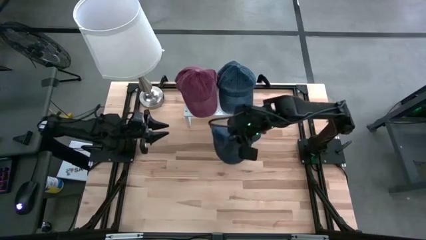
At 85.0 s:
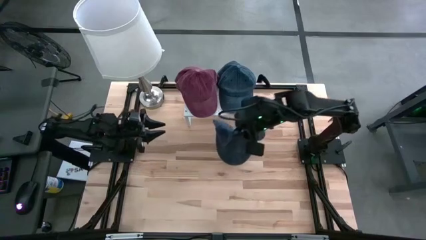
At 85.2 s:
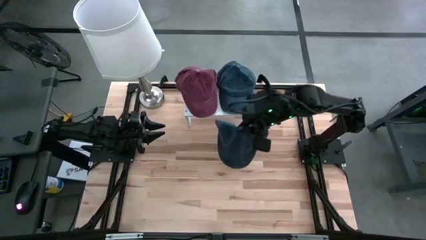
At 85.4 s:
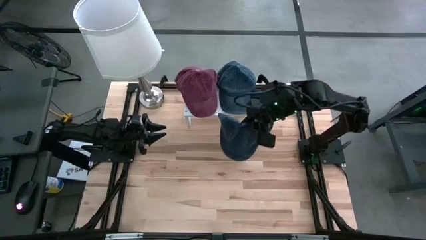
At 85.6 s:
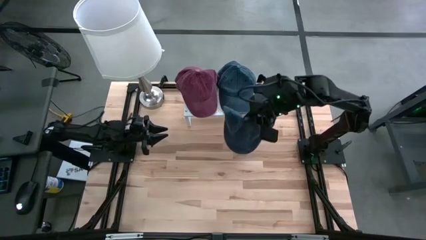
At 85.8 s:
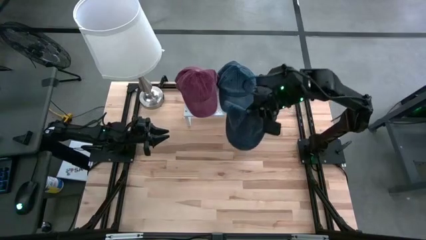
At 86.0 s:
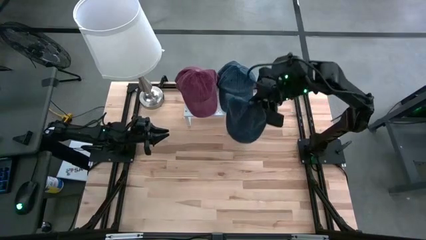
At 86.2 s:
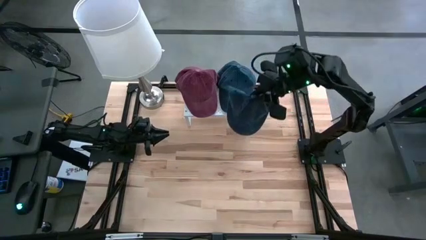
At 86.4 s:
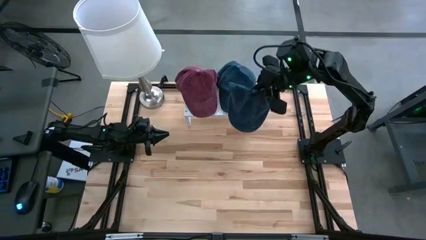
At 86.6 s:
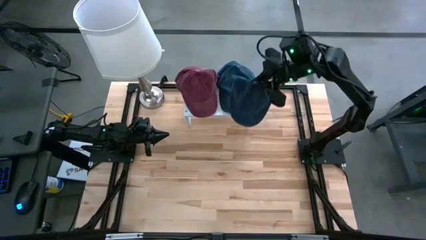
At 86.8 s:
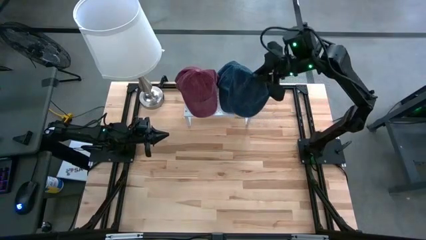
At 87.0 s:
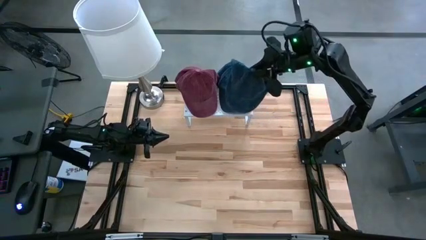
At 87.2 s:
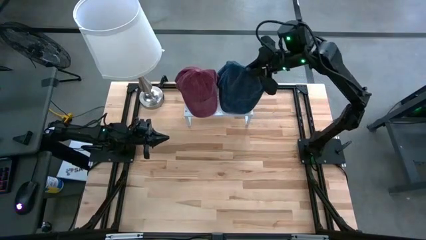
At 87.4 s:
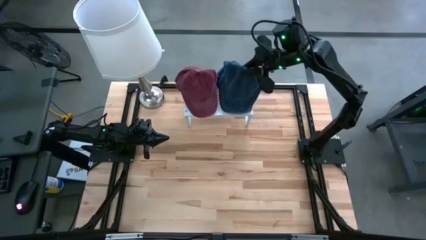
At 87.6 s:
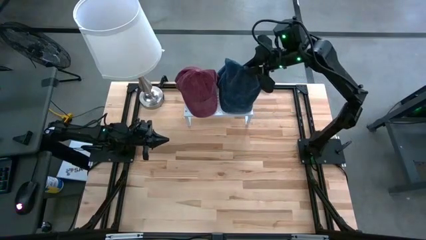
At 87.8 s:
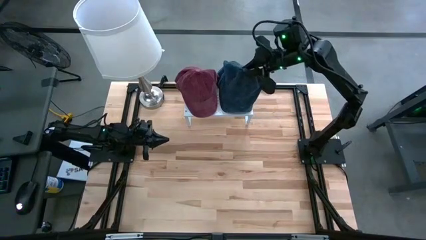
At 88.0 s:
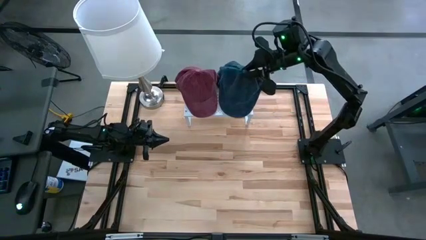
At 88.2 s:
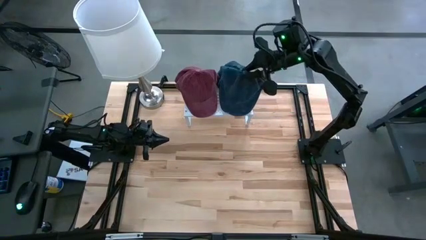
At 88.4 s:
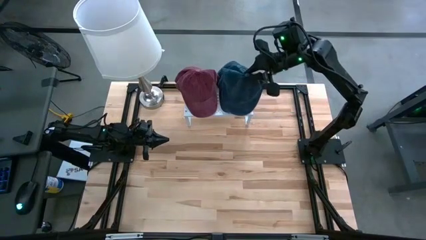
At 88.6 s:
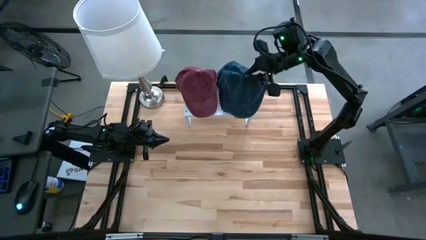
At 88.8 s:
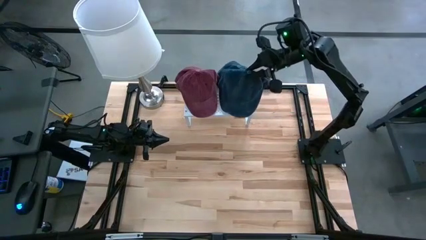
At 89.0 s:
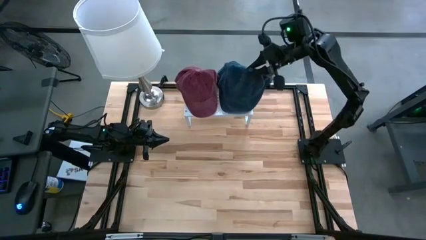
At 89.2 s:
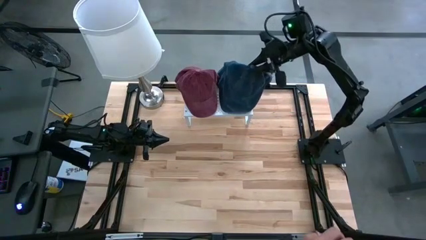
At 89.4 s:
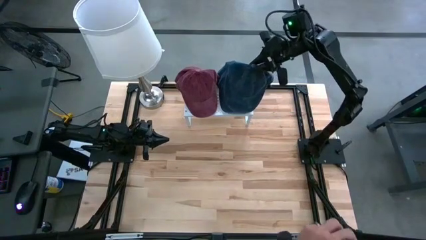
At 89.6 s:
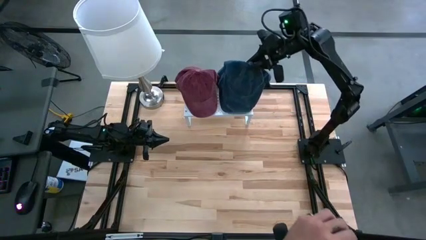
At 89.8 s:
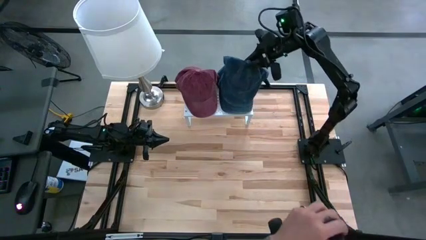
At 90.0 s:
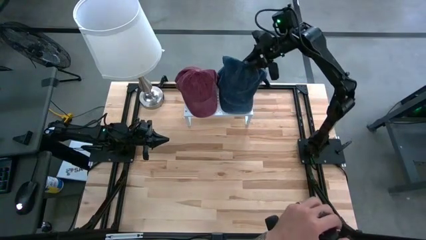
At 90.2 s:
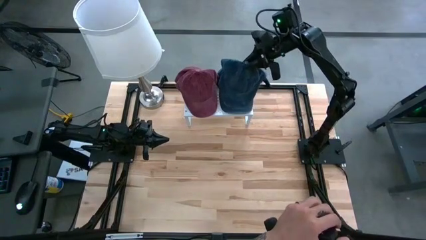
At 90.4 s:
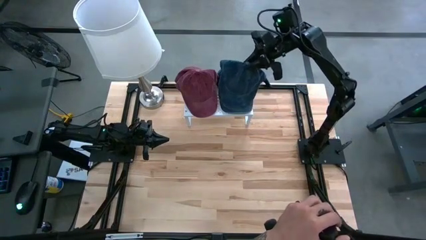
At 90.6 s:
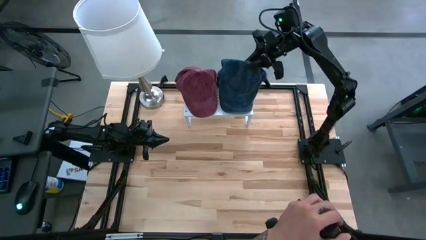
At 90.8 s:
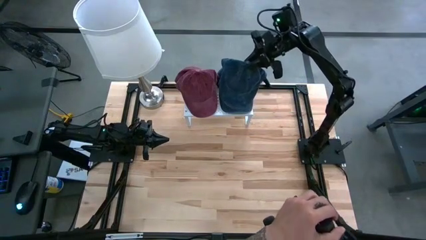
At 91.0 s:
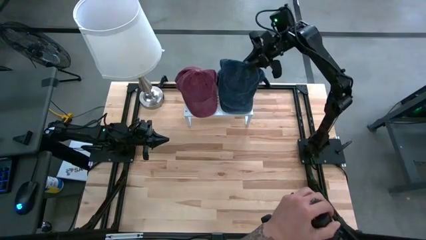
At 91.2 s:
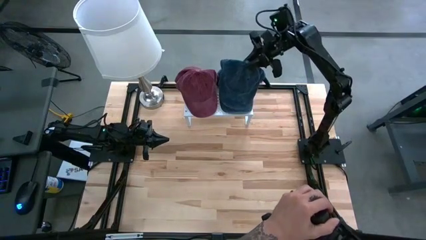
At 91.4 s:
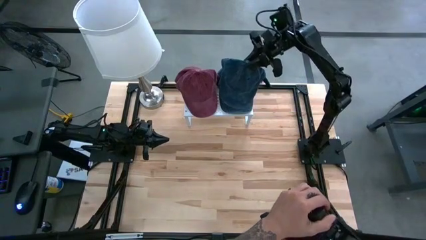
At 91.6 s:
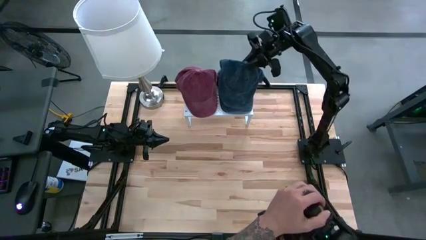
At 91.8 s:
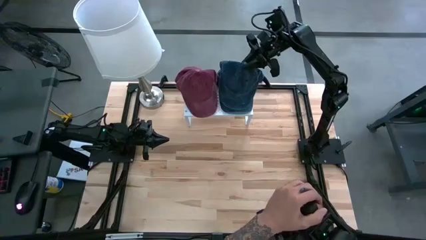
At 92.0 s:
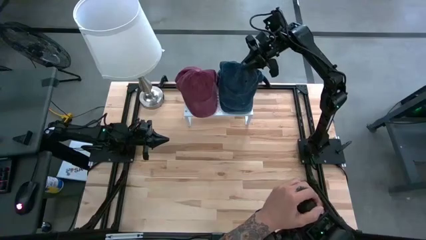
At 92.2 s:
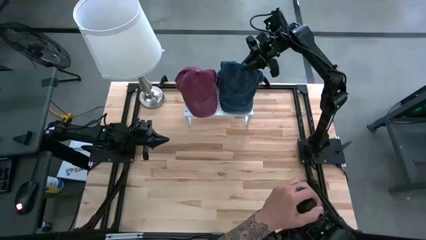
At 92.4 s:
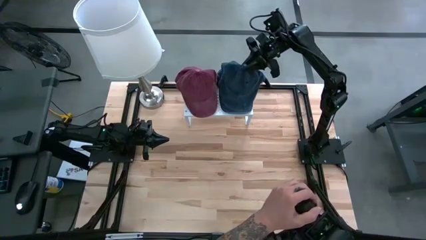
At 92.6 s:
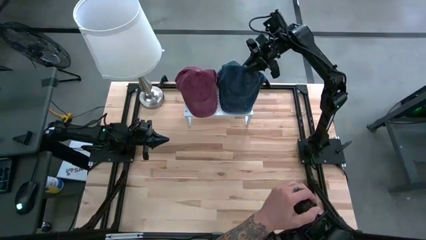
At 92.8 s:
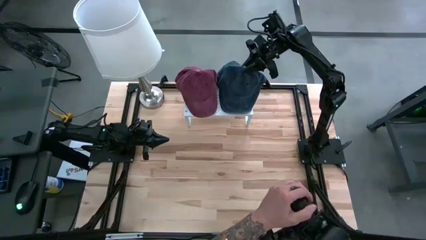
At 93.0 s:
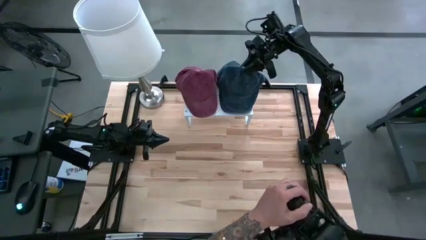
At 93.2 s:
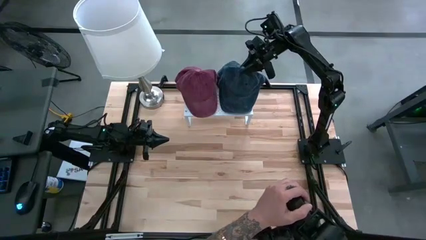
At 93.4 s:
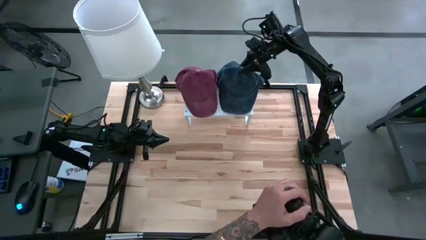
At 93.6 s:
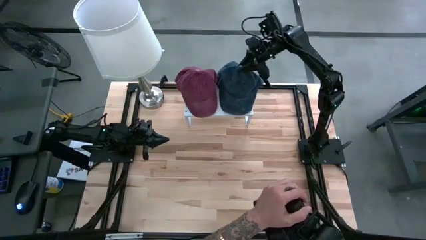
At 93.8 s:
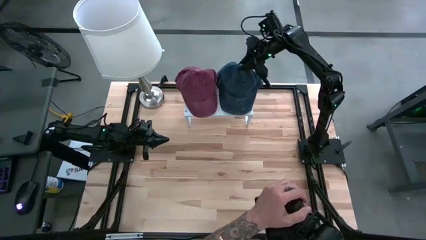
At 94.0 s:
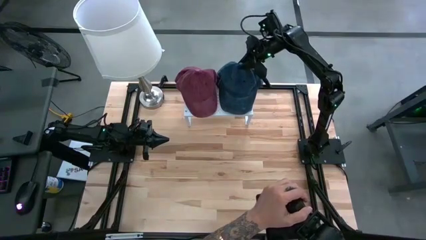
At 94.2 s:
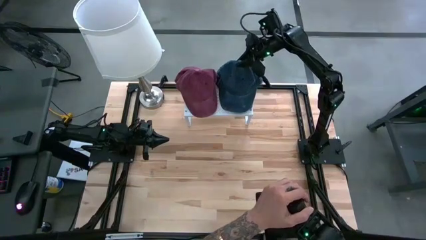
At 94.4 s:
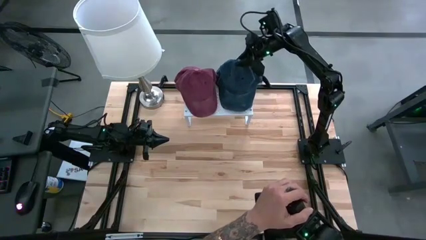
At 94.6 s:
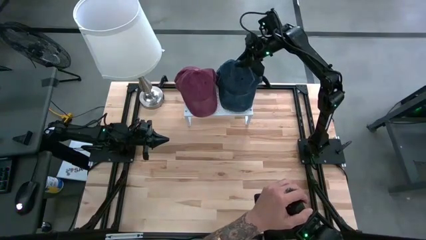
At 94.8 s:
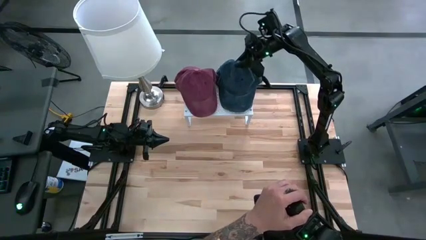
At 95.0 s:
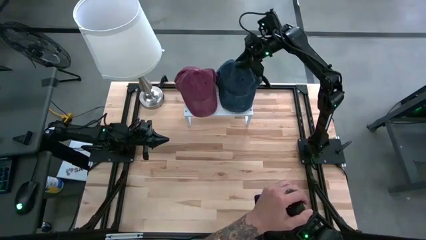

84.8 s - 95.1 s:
Task: Pick & Place hat
Stack the blue cap on top of the blue cap on the shelf

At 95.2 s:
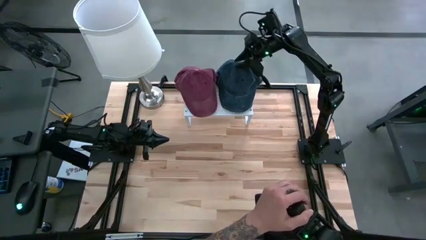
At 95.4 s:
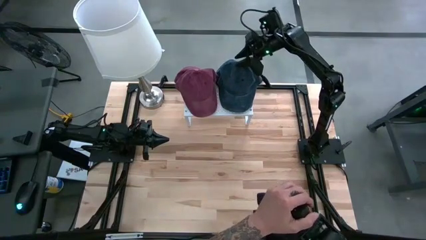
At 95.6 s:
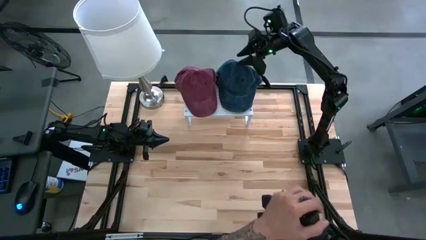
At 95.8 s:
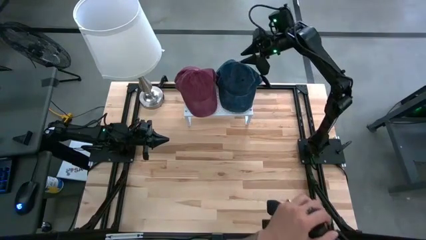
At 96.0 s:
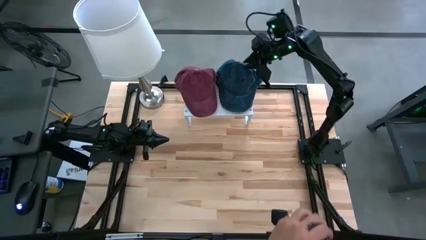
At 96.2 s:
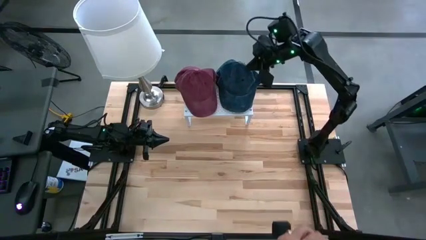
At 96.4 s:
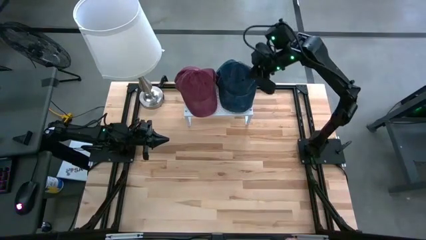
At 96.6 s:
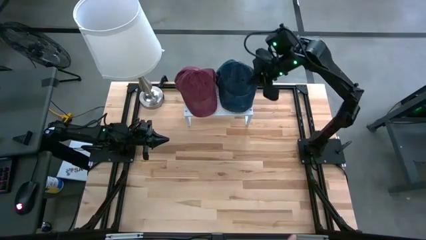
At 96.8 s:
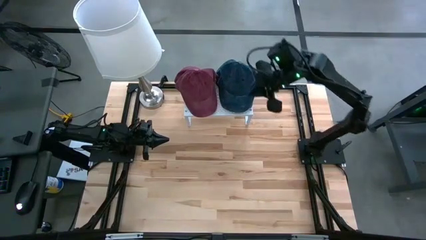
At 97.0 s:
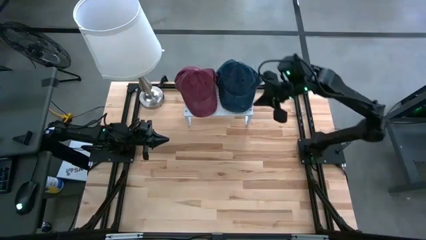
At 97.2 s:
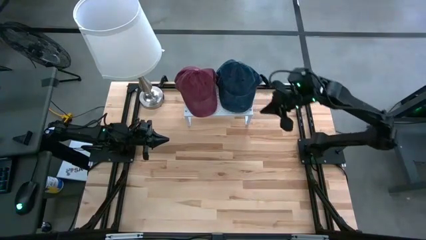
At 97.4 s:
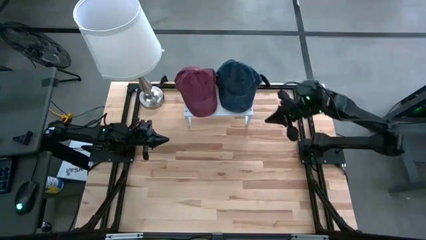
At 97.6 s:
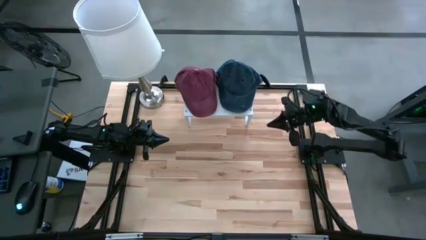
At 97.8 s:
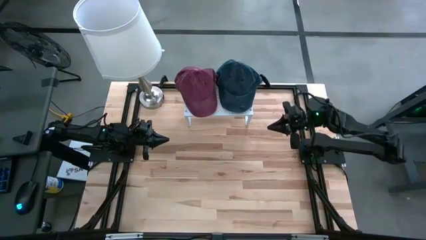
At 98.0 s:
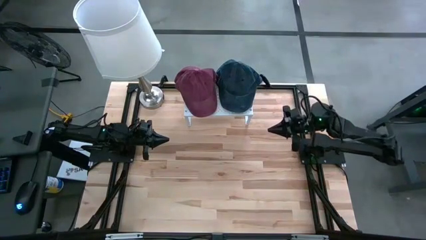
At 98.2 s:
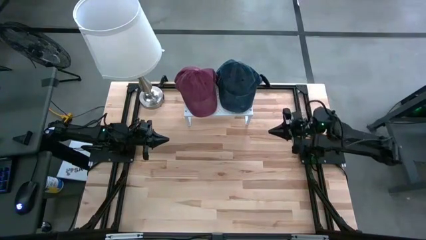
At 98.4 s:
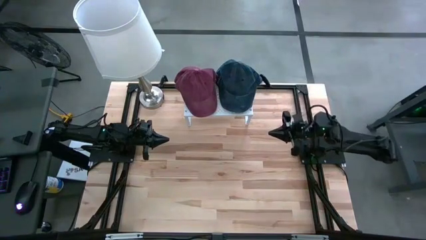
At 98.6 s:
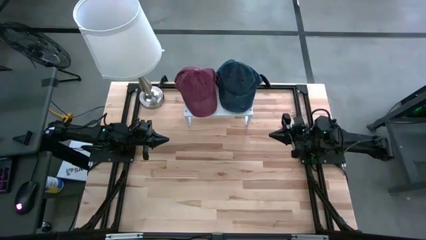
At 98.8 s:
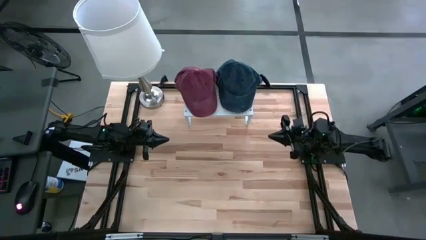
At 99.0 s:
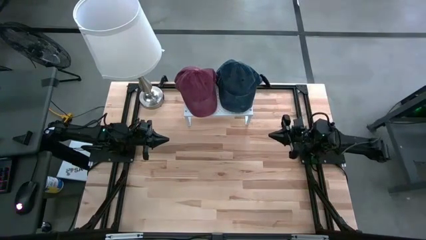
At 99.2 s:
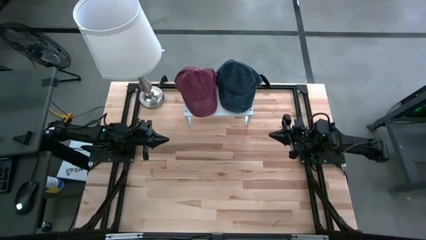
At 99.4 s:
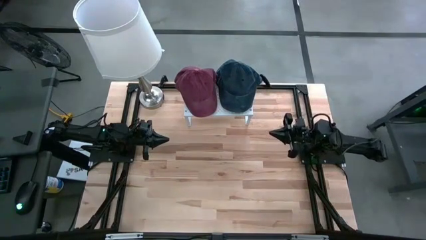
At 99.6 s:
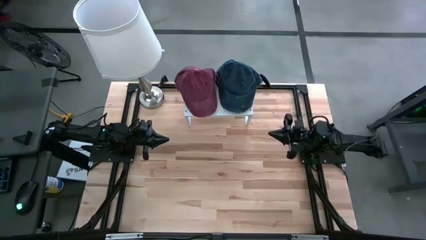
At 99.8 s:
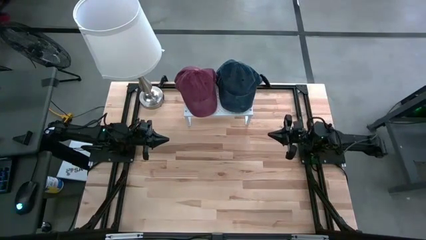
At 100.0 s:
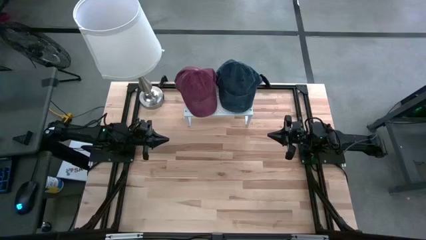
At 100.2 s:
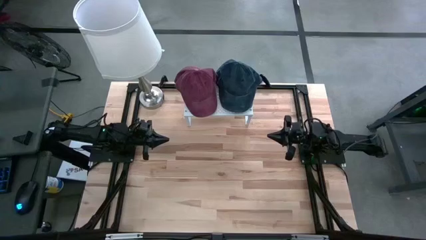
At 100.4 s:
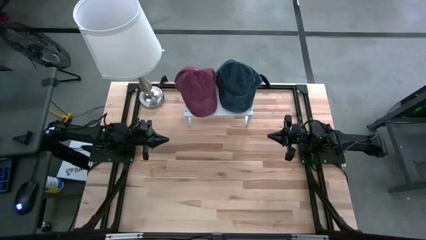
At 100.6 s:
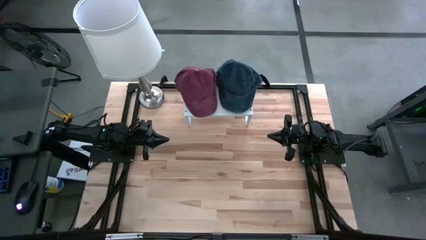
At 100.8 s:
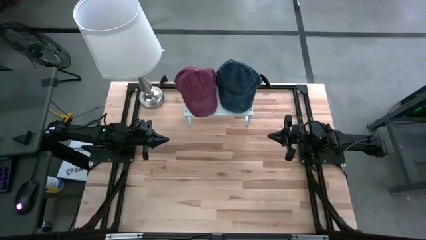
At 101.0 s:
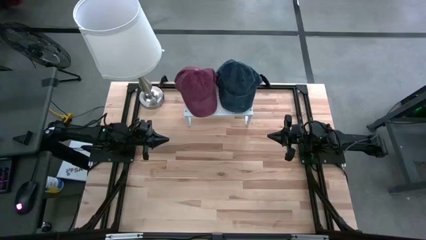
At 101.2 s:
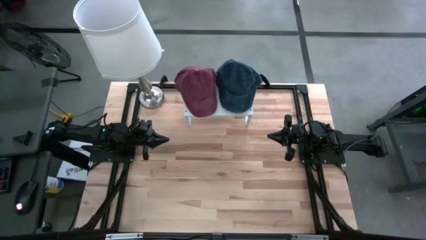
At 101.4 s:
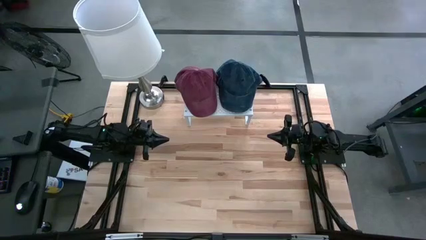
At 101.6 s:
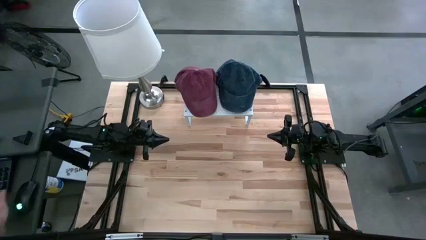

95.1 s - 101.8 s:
Return to Home Position
